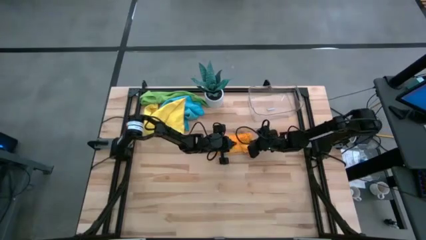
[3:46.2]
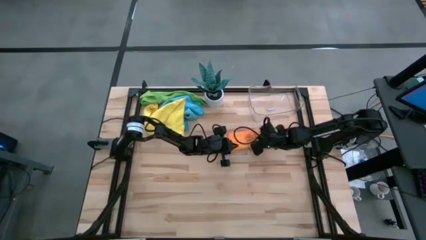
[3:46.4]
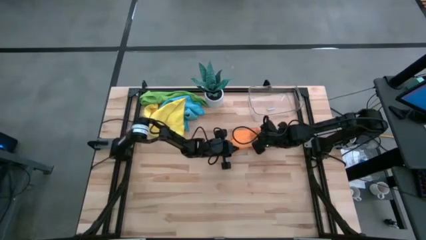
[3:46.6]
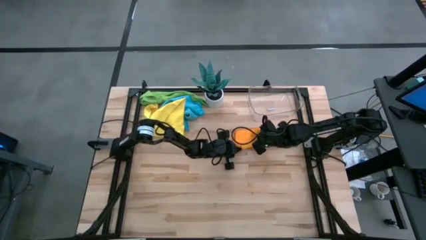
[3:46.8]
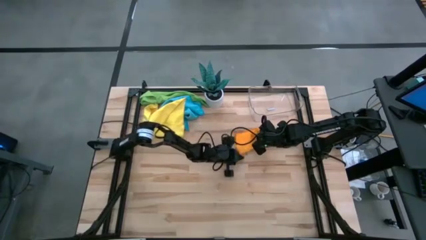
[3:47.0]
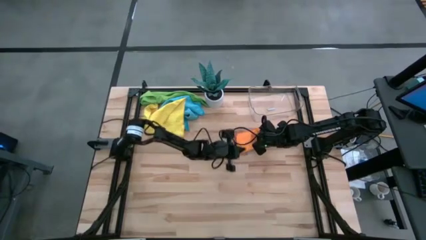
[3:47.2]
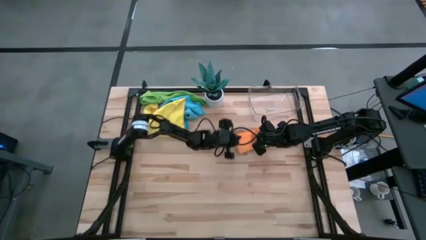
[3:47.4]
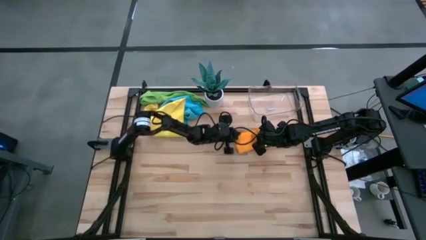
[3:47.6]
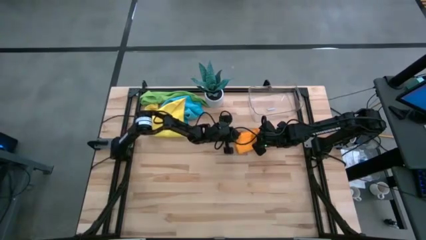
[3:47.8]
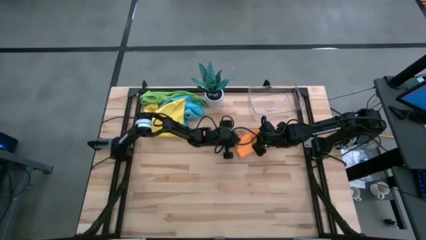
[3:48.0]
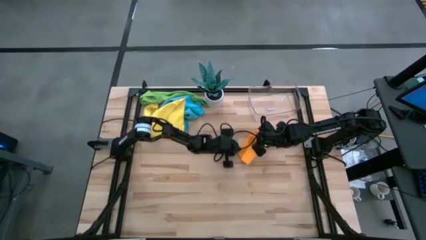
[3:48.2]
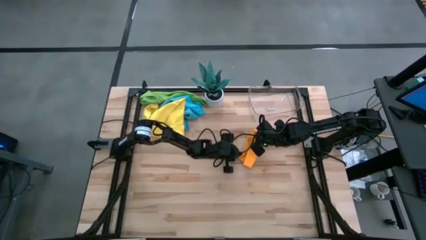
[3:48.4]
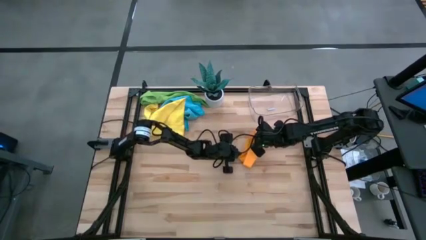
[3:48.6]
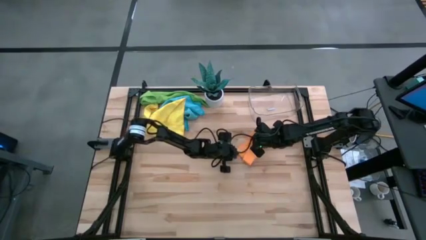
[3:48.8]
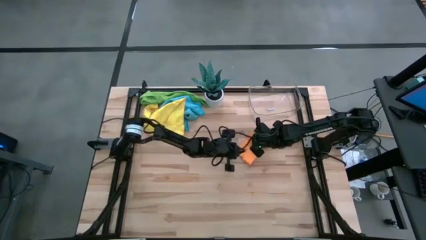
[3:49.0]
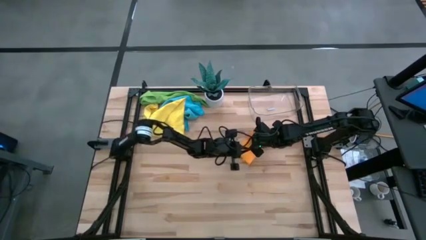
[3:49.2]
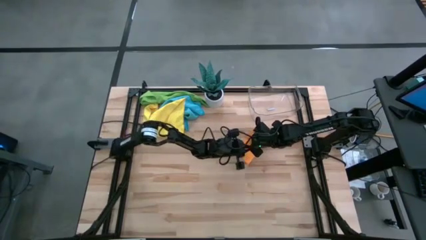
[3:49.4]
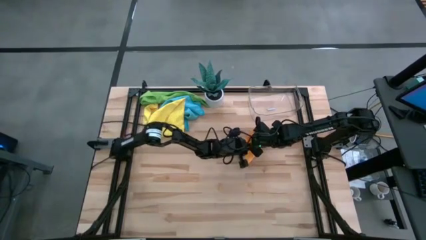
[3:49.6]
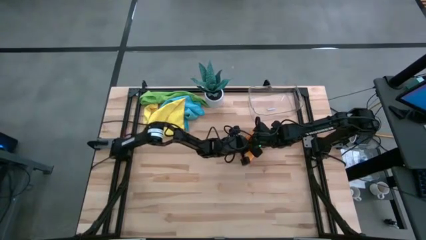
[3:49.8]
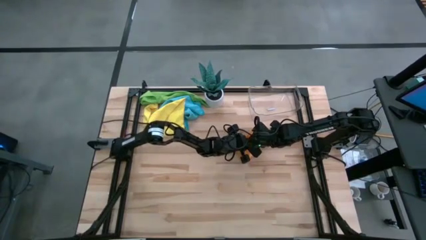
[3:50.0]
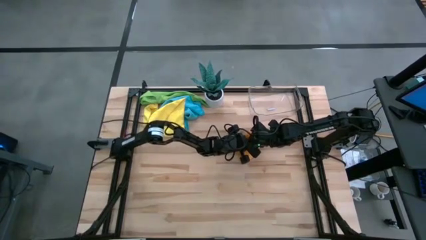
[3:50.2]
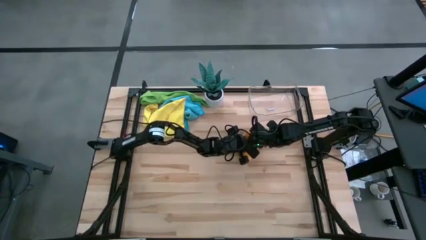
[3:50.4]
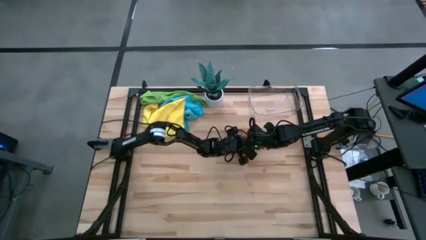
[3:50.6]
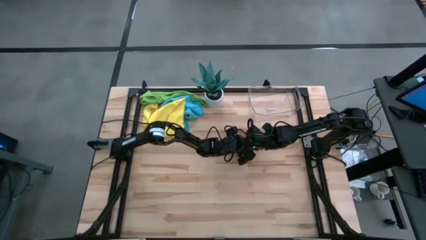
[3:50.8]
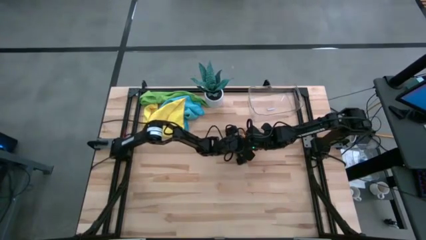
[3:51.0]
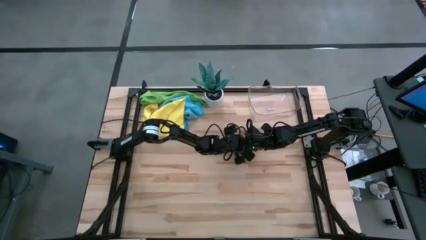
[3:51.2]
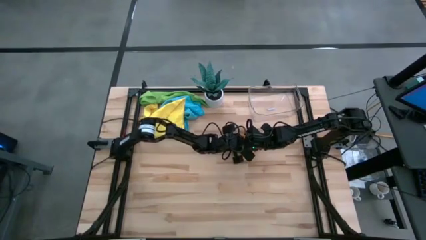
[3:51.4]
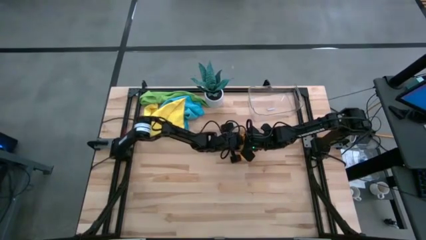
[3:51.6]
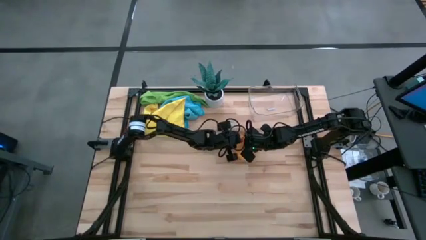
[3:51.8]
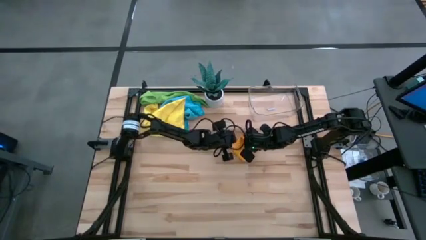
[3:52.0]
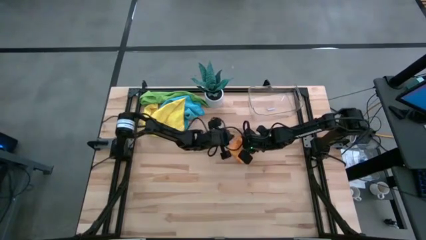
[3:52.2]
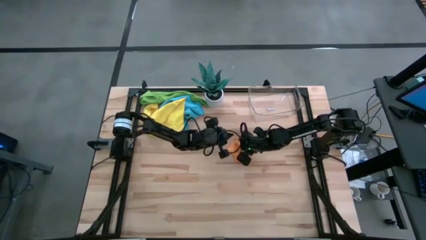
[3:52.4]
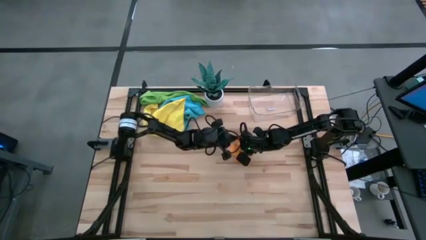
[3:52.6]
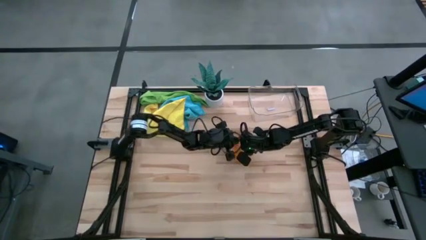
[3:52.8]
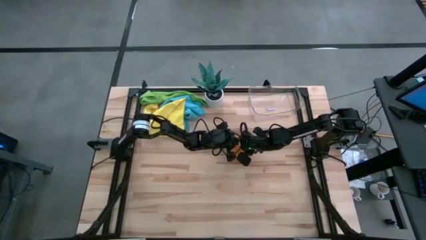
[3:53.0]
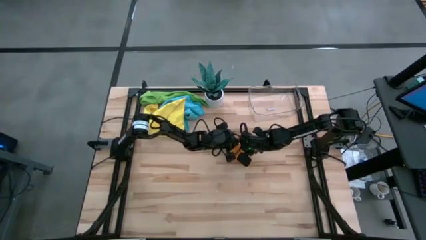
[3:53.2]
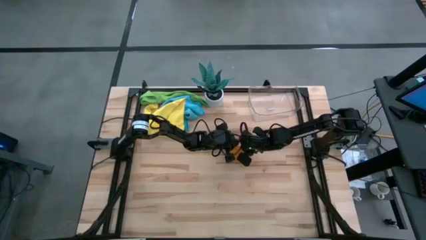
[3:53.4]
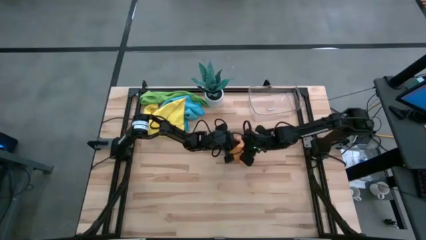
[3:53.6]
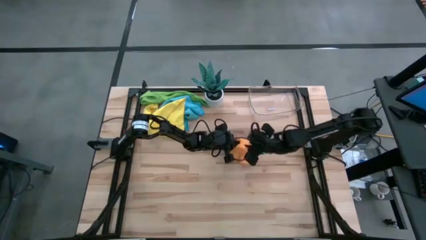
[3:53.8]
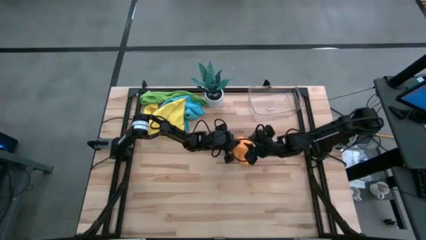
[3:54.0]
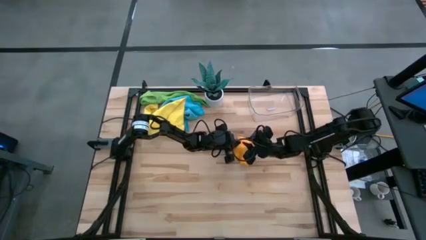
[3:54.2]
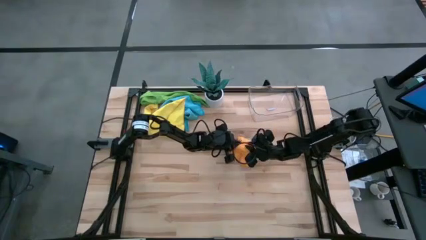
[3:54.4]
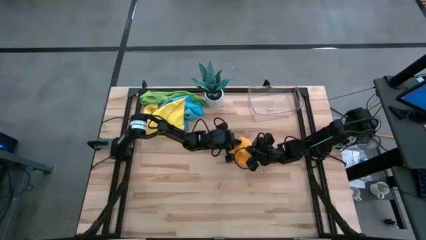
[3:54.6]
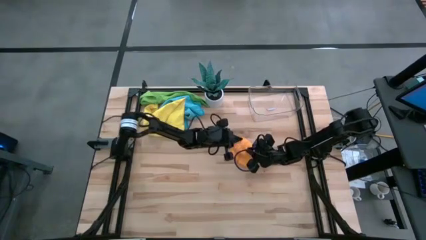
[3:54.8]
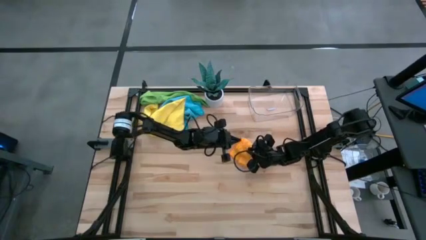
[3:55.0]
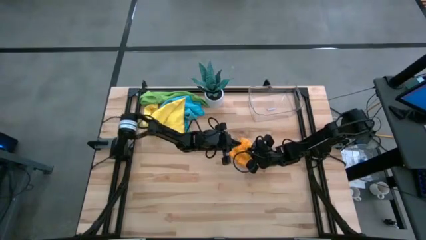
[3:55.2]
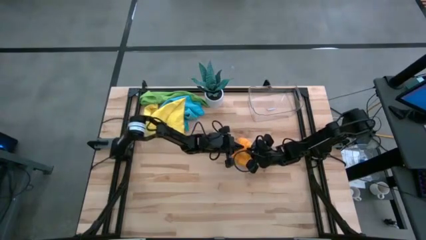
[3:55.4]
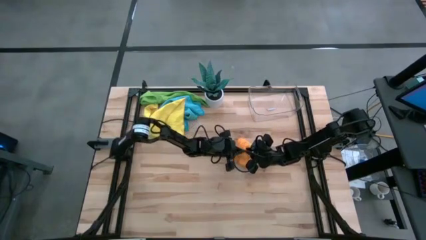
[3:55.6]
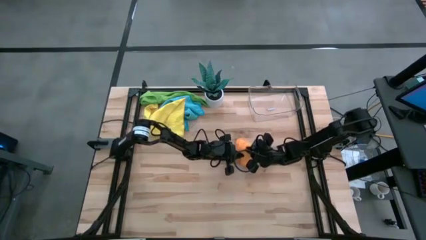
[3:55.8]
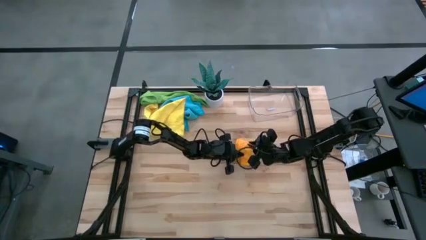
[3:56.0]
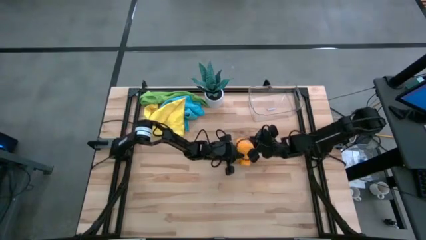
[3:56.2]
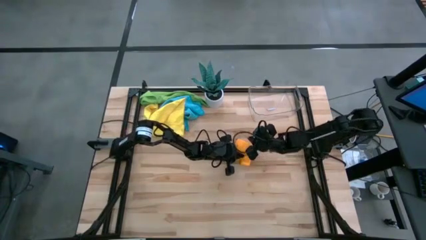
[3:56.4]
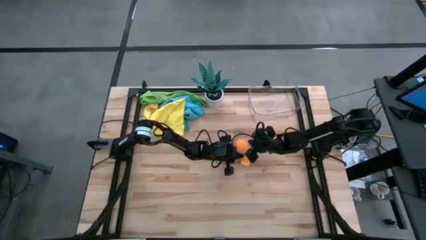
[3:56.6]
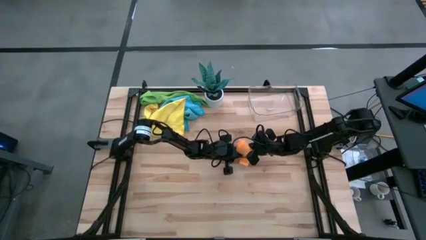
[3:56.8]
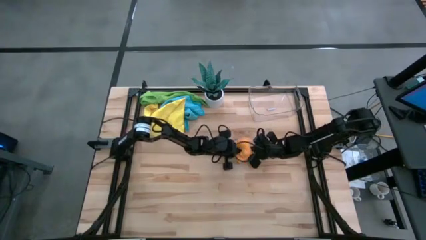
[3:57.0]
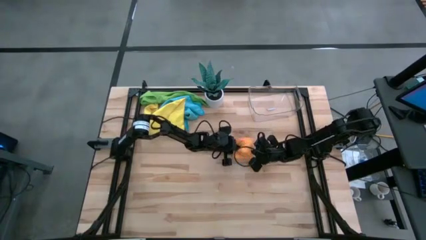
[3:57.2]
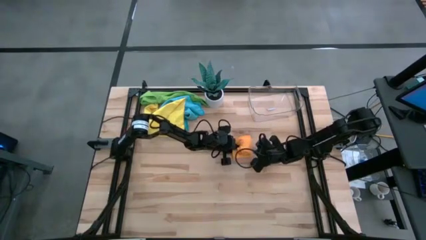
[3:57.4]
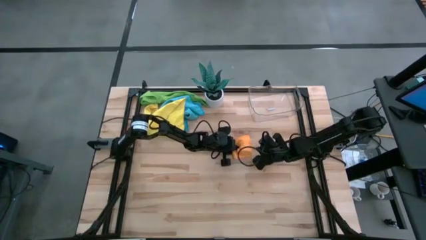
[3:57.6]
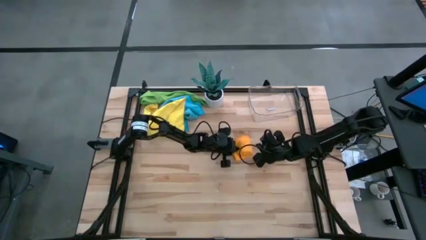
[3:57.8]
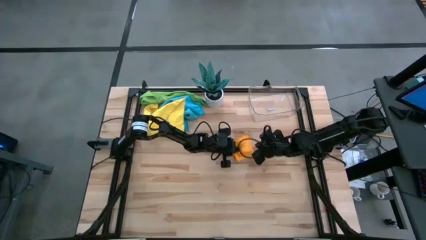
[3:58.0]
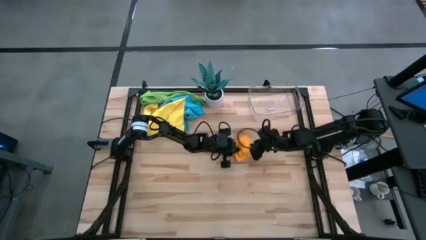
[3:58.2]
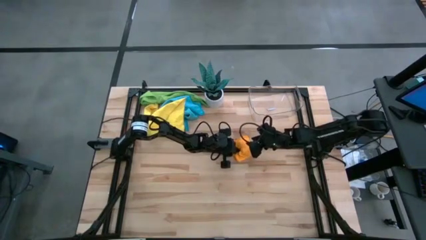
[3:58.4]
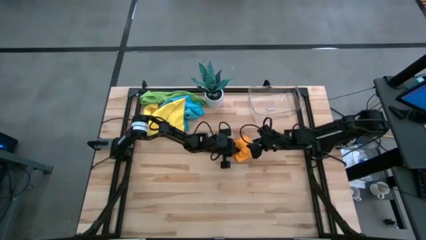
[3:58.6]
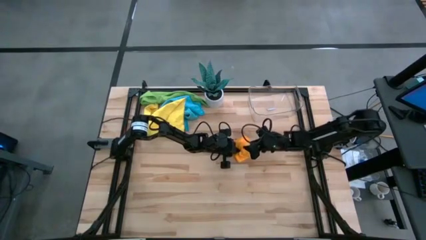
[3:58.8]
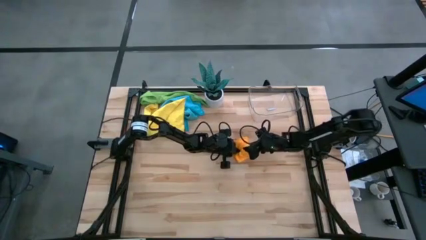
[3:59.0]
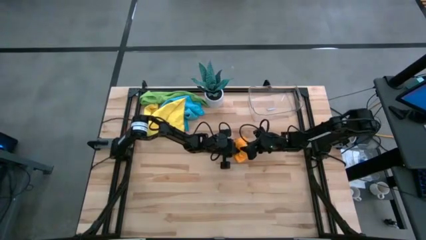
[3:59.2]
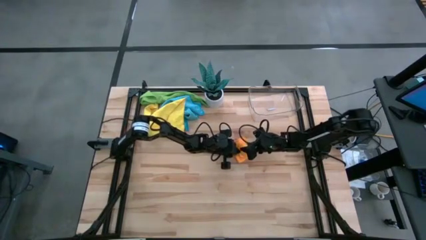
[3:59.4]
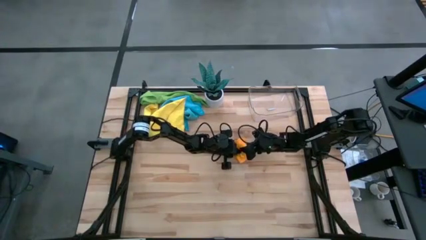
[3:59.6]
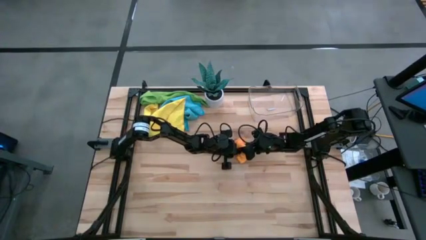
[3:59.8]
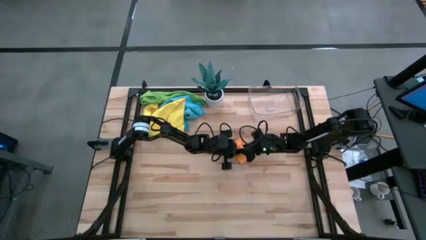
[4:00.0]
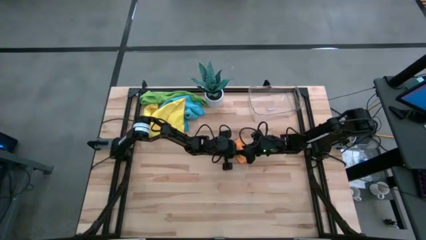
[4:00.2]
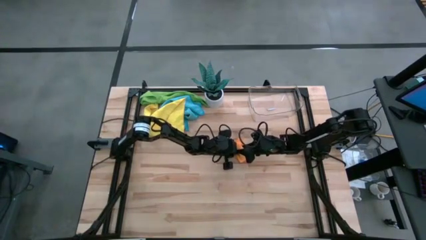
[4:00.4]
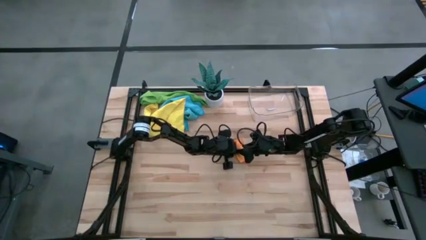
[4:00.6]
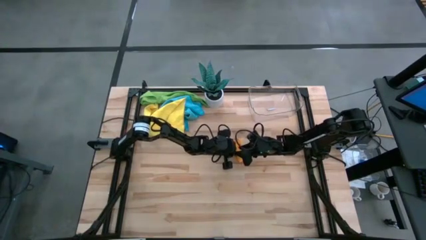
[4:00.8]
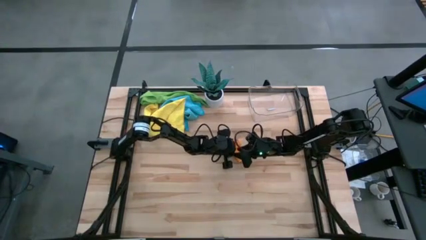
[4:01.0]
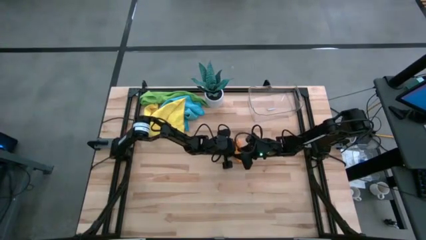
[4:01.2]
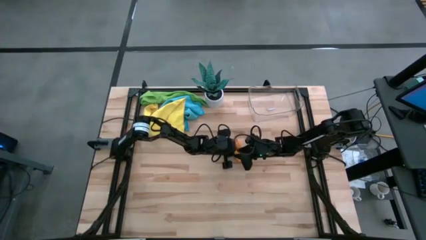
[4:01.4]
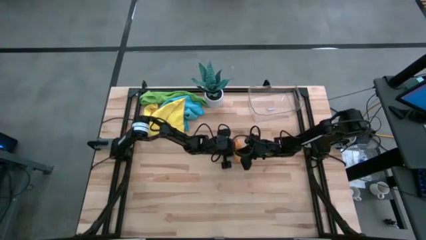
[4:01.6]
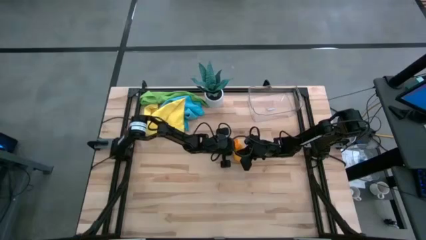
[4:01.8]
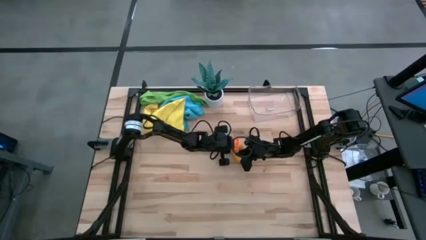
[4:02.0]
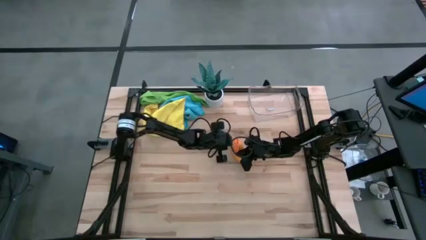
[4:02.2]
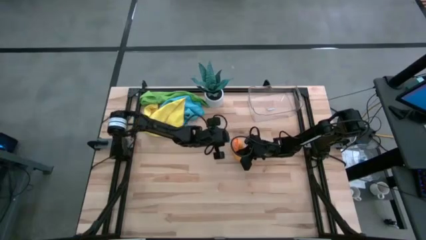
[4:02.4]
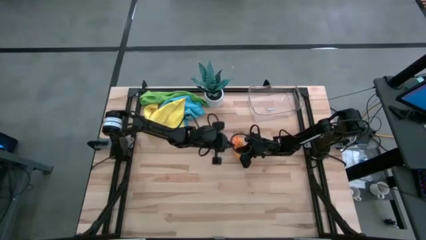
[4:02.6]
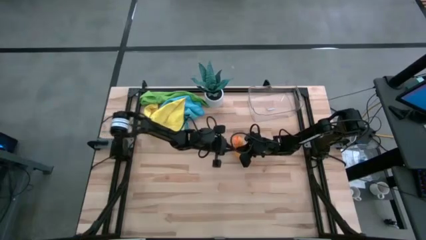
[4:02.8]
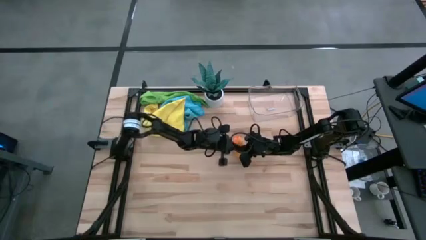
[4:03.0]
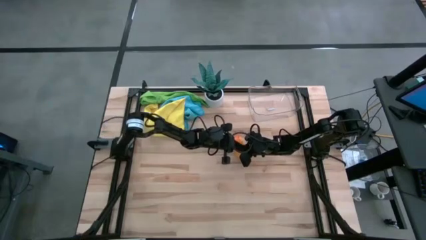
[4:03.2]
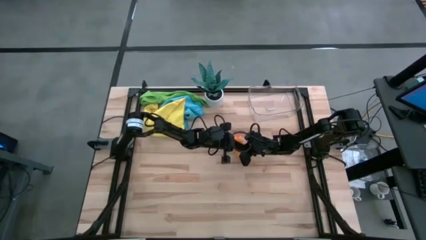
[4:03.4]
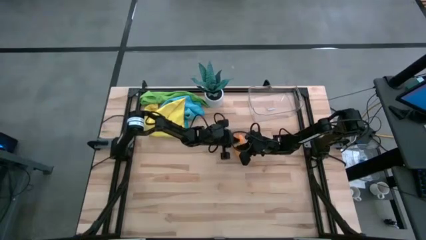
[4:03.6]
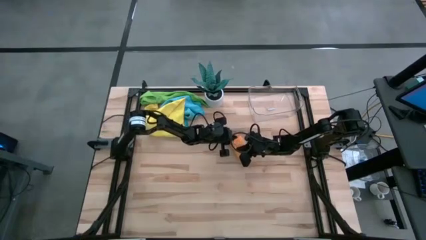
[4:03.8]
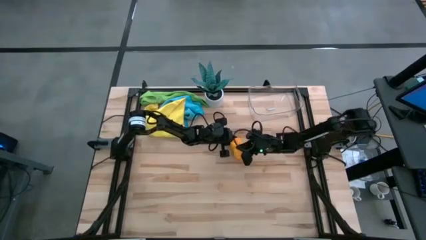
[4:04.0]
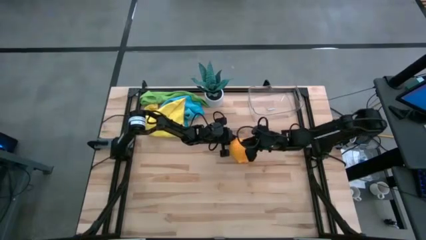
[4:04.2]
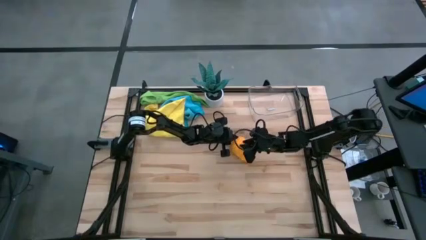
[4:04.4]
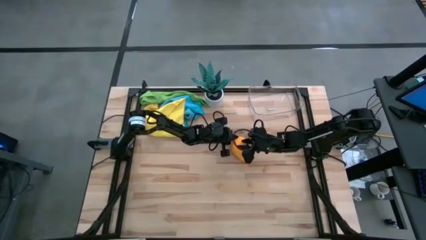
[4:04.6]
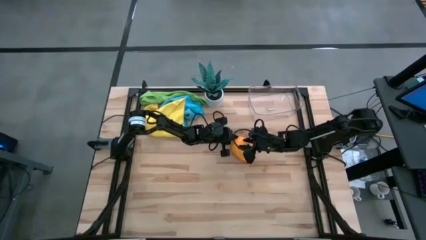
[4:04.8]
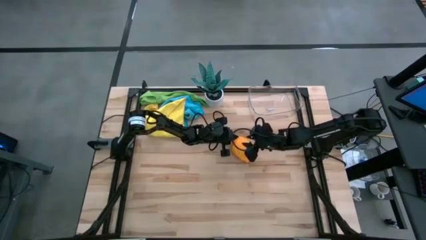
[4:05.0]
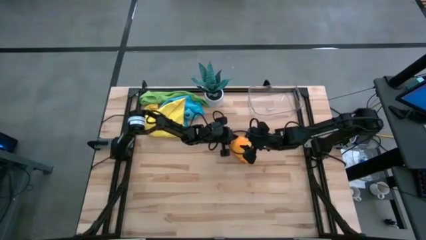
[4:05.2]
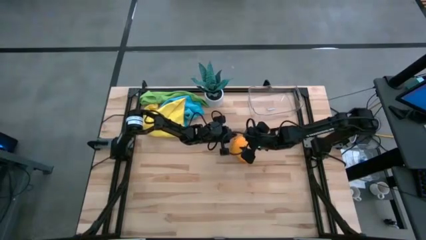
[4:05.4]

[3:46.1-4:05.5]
Task: Roll microfiber towels into tight, uniform cylinder then place into a basket
Roll the orange microfiber cloth
